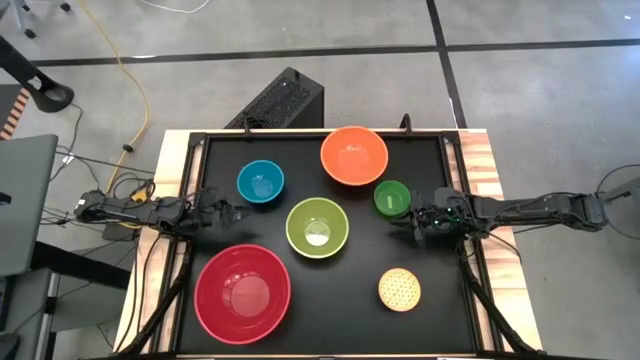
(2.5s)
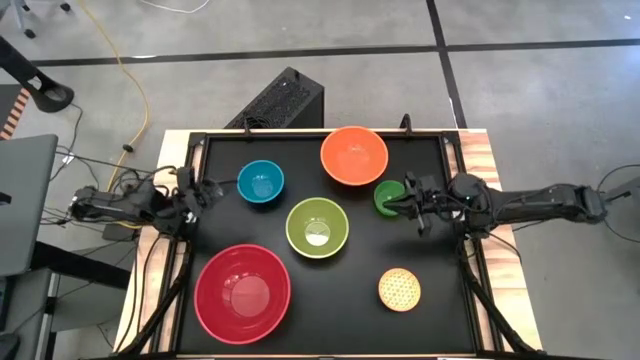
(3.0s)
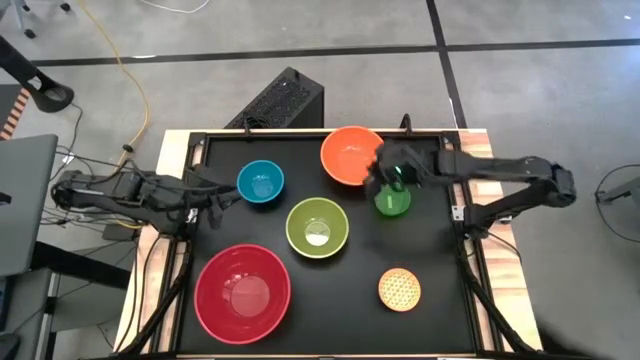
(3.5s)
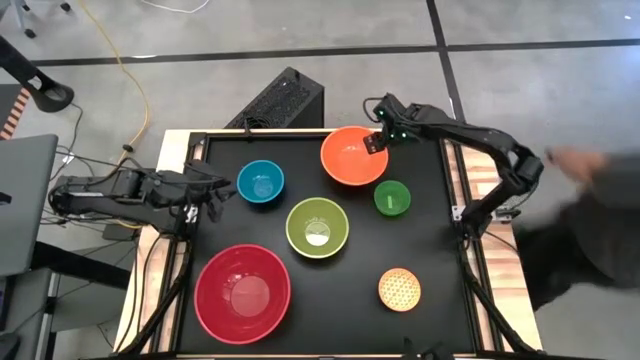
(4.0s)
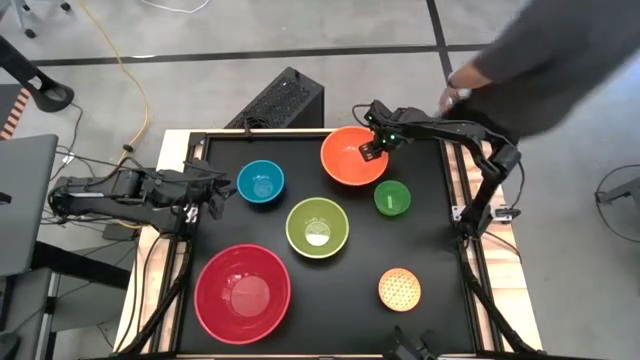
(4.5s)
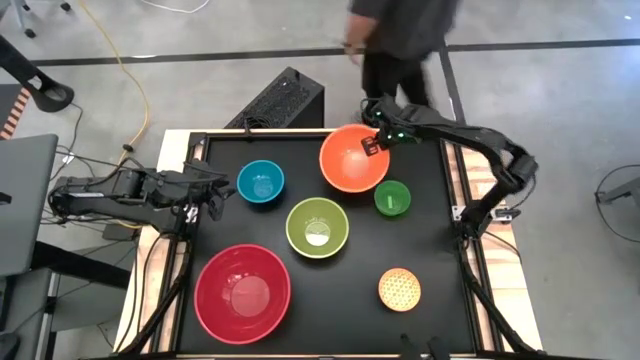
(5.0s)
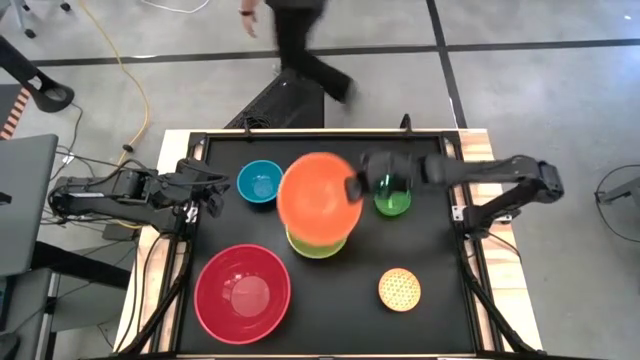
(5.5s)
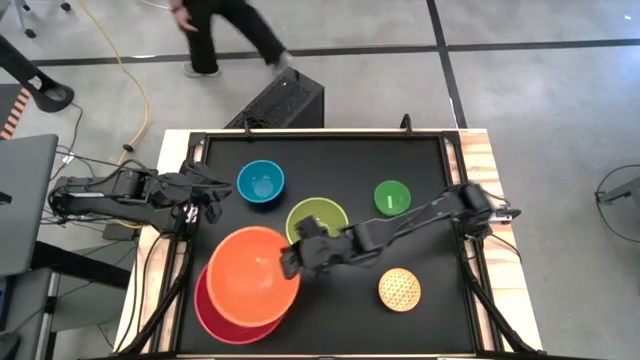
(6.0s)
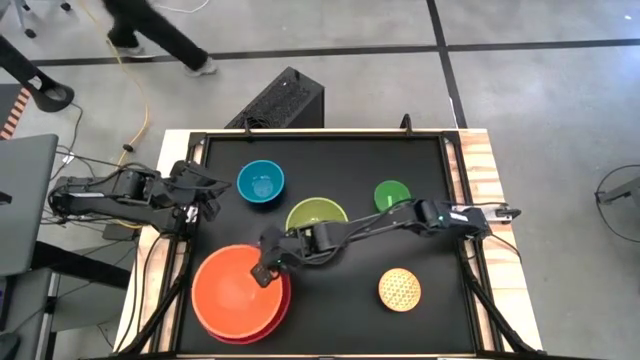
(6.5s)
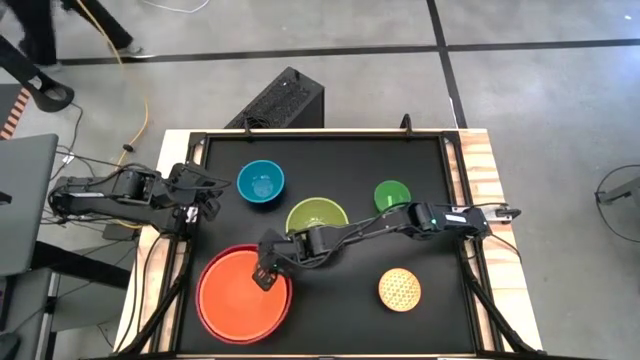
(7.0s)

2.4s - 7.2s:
Stack the orange bowl on top of the red bowl

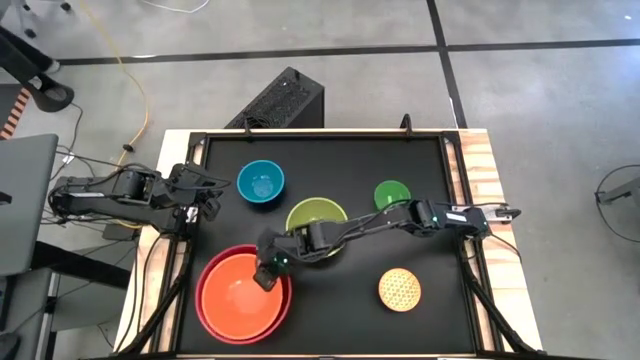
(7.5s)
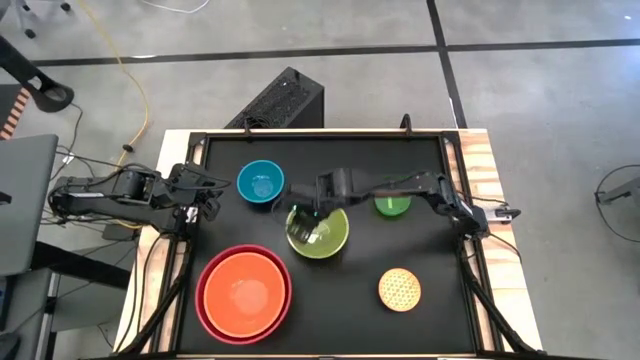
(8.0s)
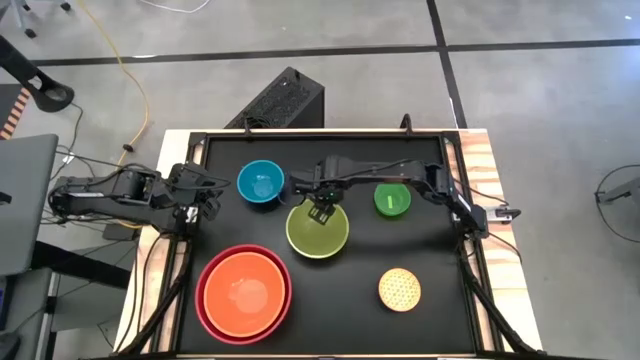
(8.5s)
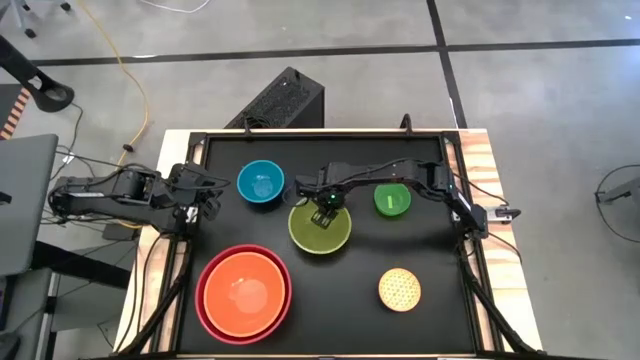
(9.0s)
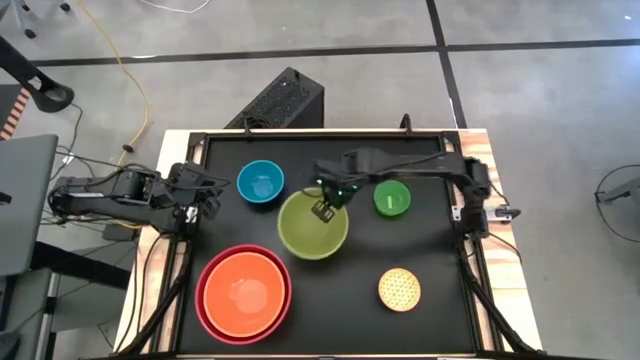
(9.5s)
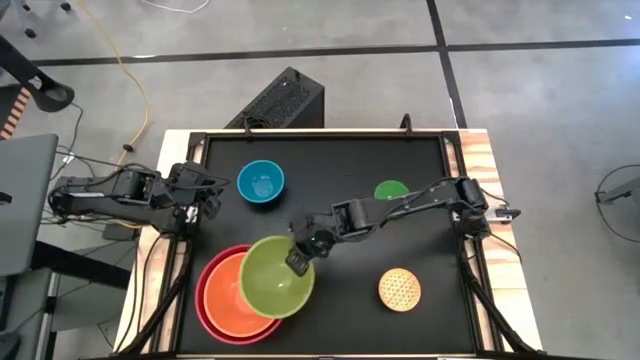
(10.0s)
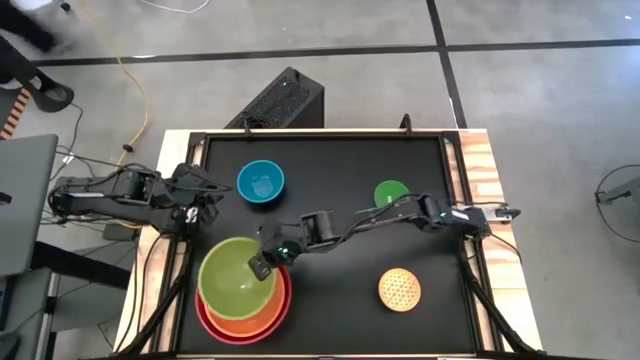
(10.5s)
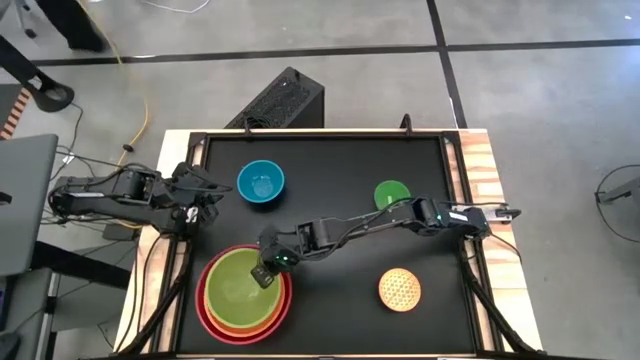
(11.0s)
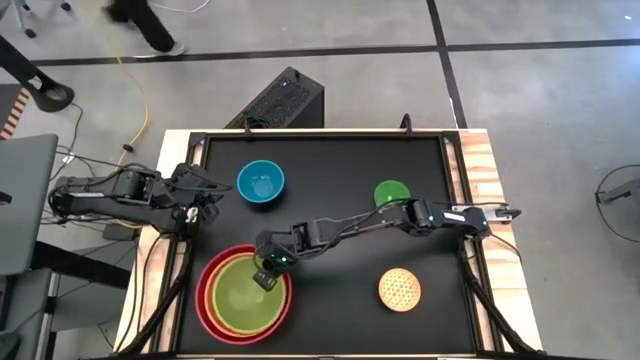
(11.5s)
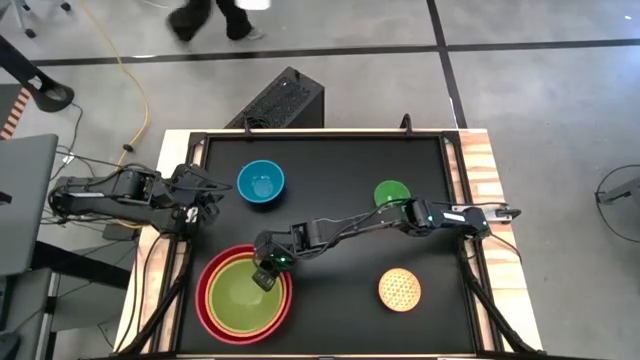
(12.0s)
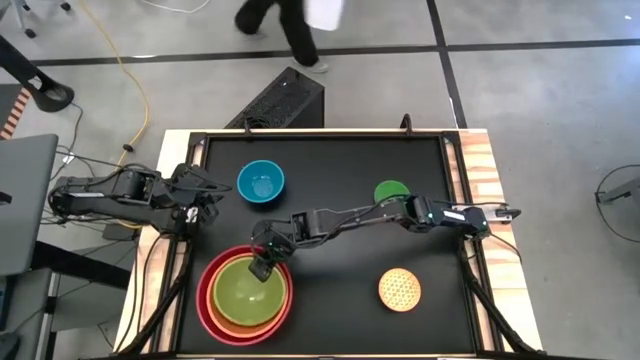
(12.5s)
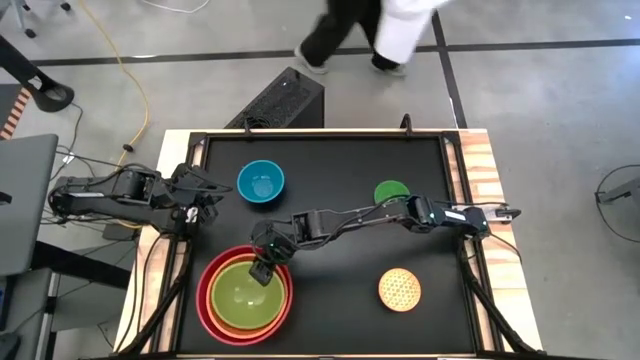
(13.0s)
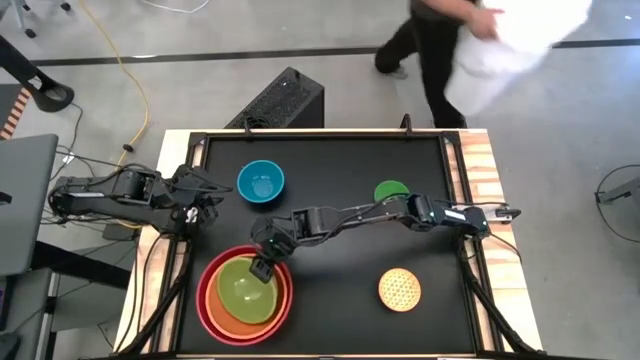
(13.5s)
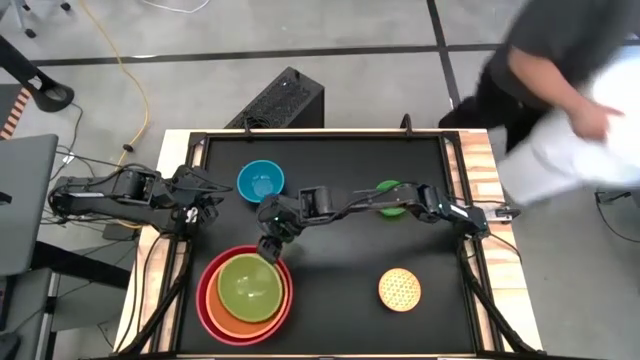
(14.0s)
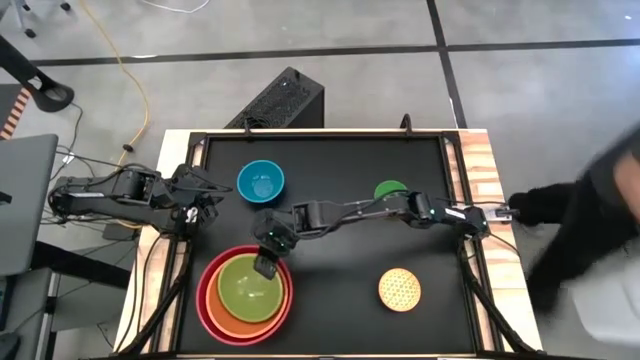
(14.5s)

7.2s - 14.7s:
Stack the light green bowl on top of the orange bowl

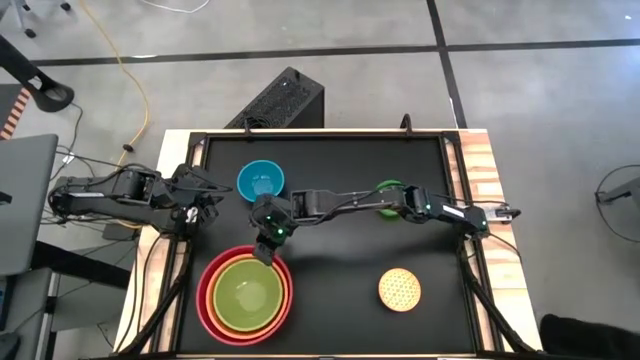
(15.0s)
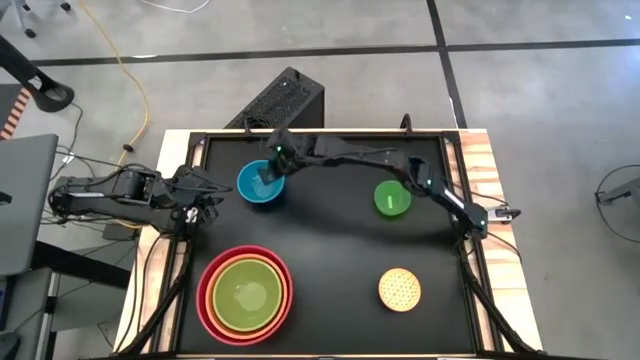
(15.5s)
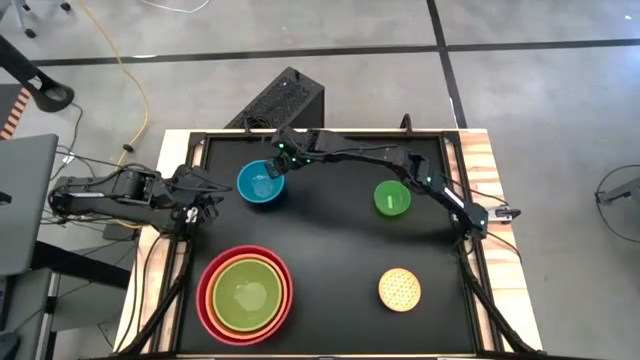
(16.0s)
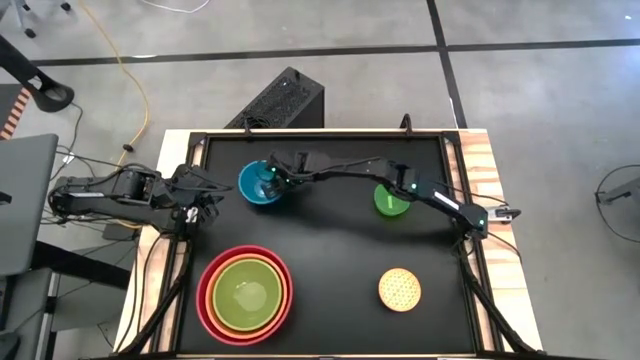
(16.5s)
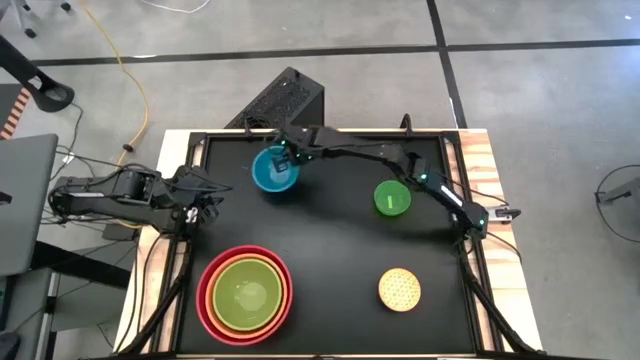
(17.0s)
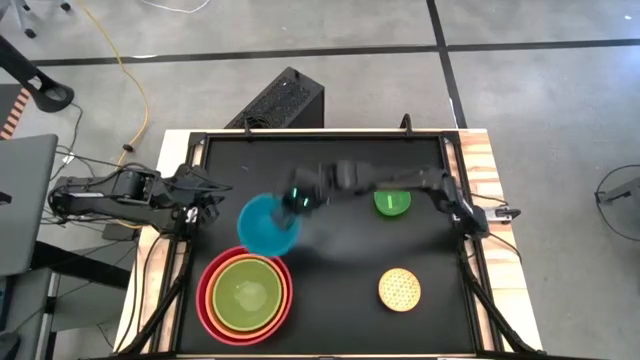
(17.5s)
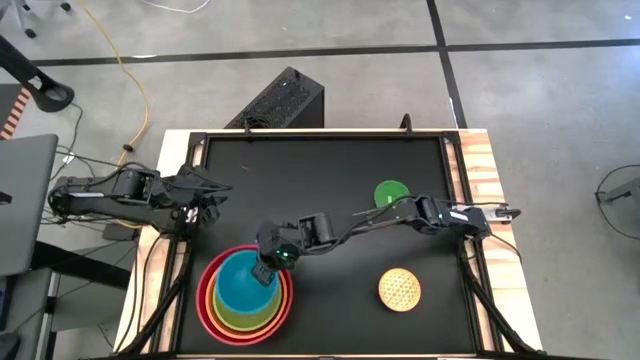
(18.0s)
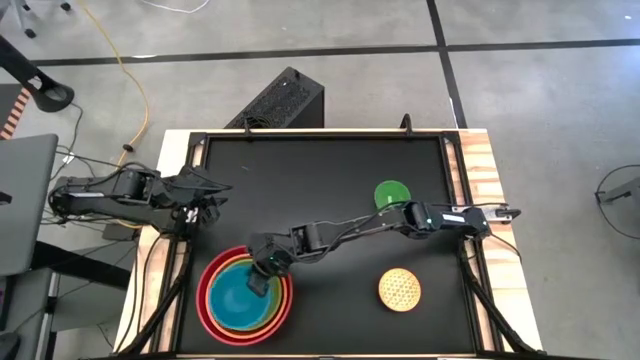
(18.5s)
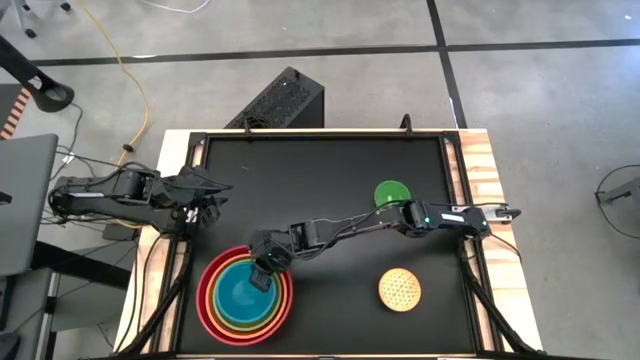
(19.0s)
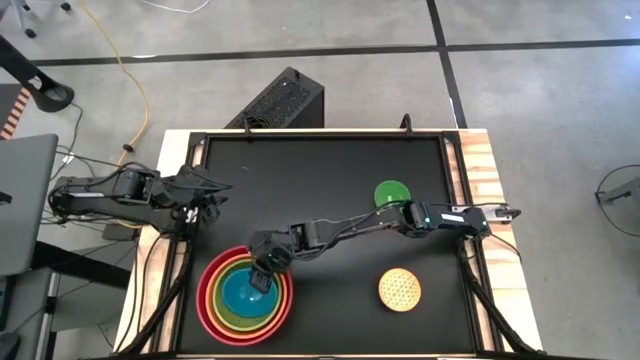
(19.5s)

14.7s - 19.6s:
Stack the blue bowl on top of the light green bowl

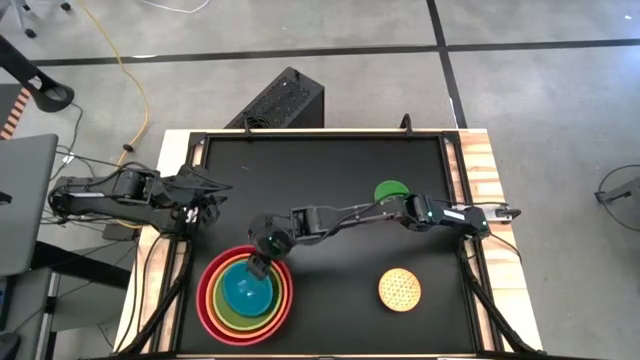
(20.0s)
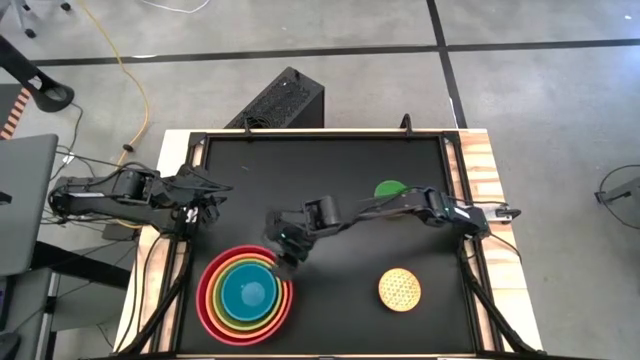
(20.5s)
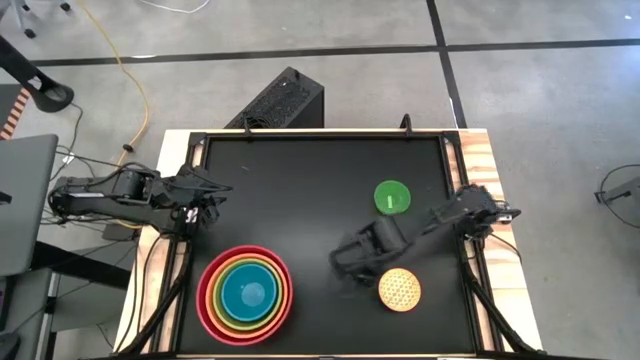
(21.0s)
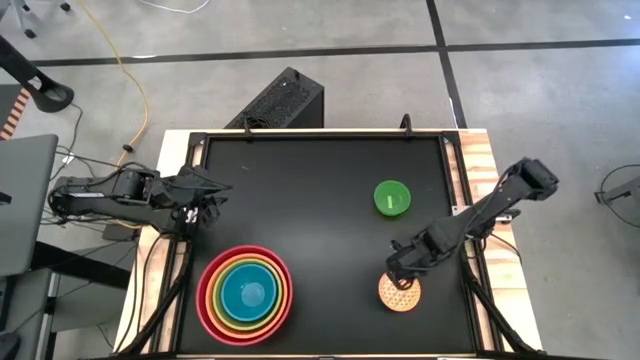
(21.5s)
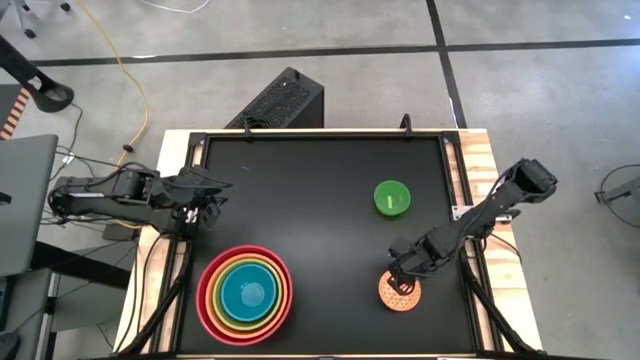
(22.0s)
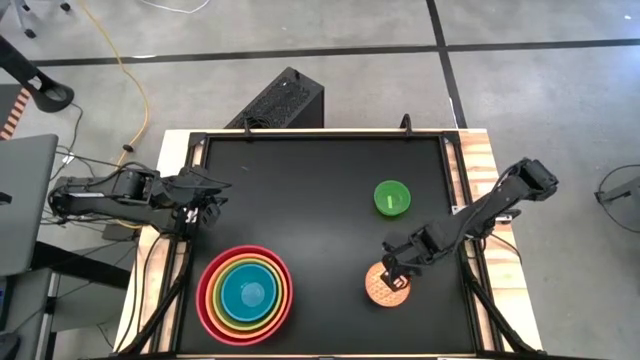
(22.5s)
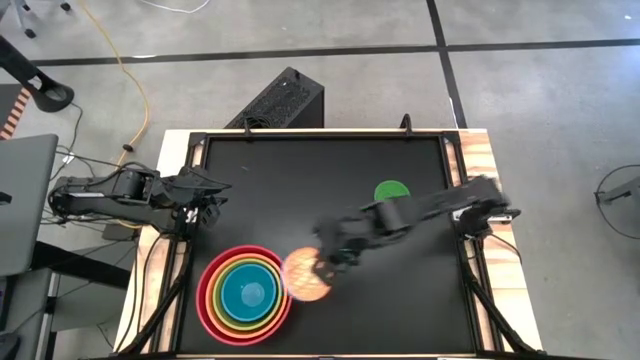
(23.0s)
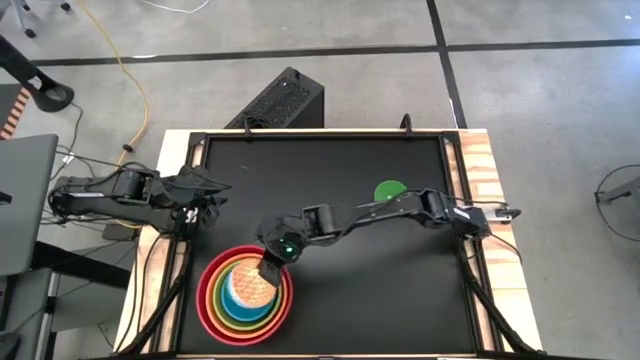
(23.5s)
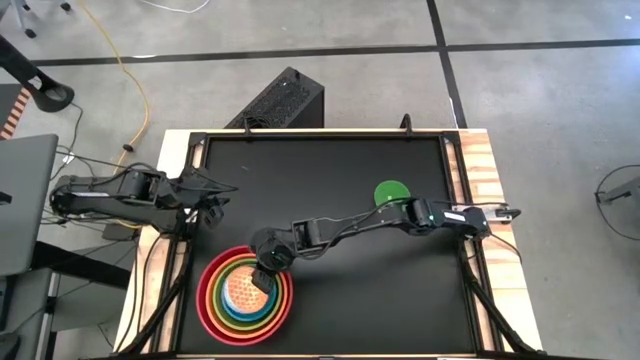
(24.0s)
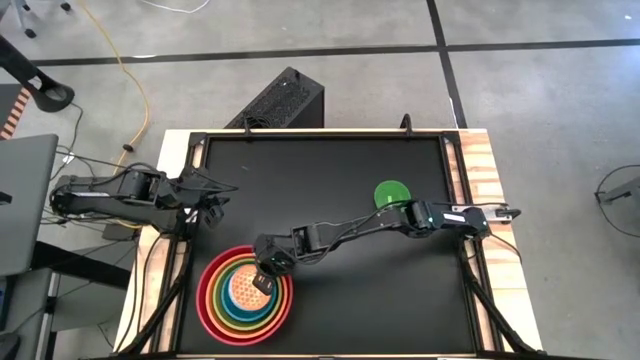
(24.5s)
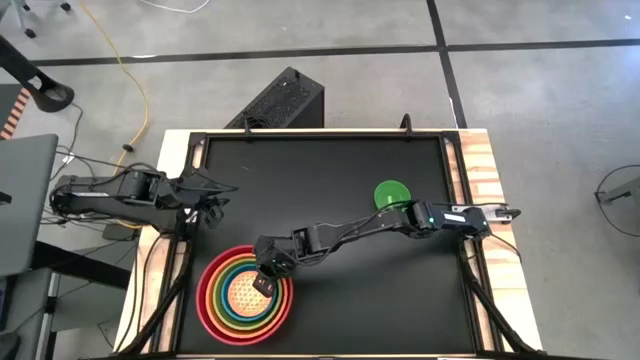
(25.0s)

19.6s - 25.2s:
Stack the orange patterned bowl on top of the blue bowl
